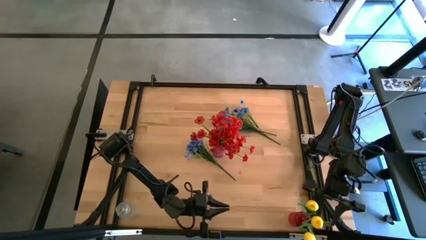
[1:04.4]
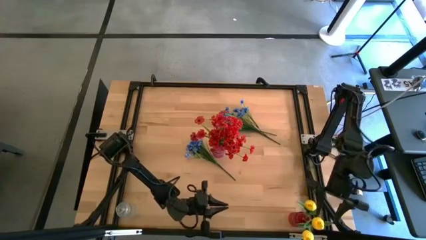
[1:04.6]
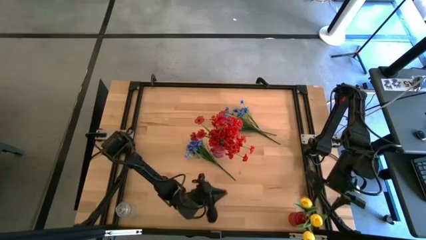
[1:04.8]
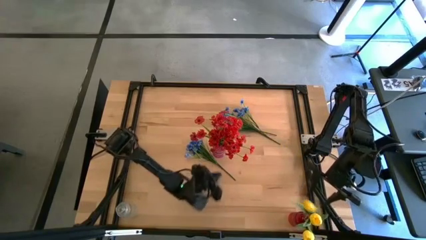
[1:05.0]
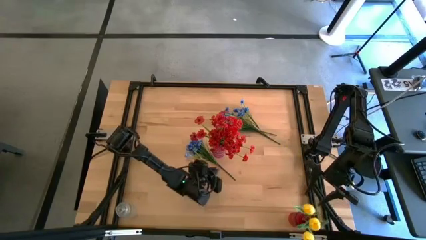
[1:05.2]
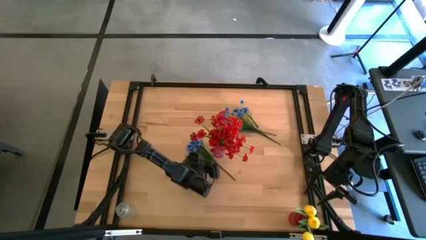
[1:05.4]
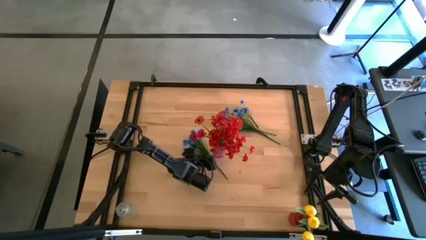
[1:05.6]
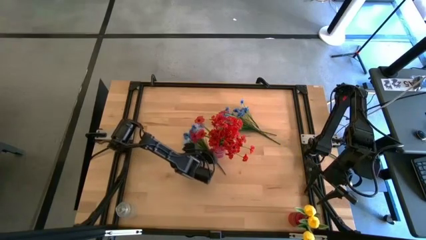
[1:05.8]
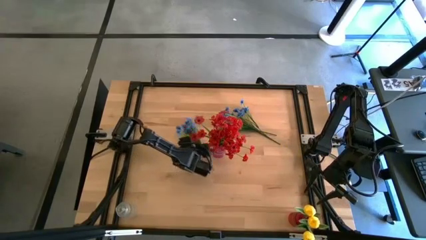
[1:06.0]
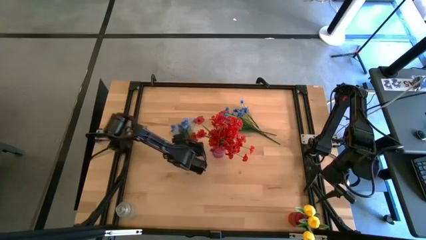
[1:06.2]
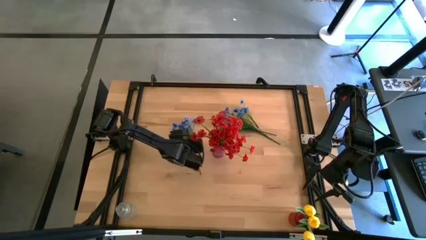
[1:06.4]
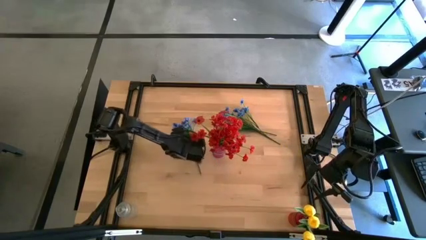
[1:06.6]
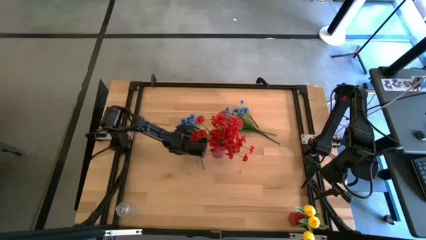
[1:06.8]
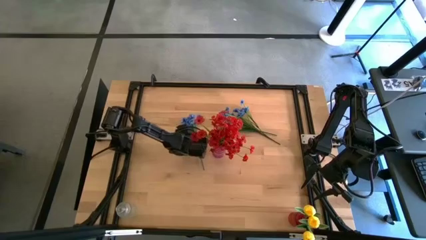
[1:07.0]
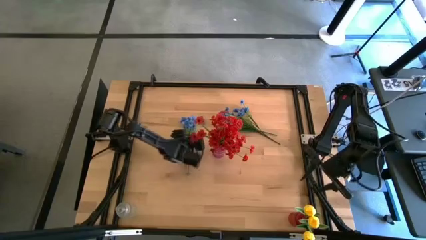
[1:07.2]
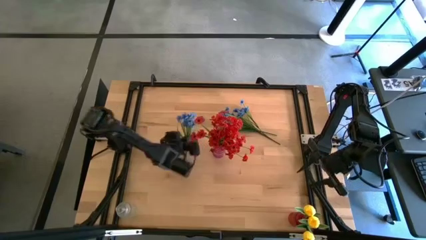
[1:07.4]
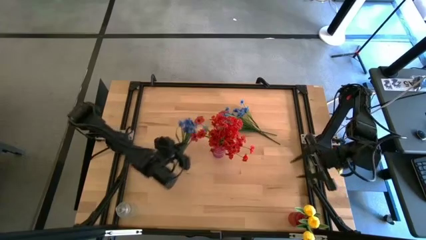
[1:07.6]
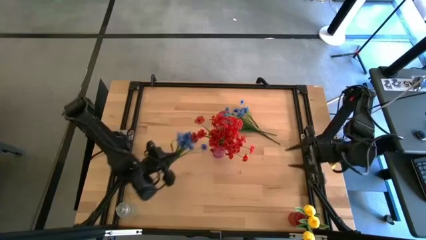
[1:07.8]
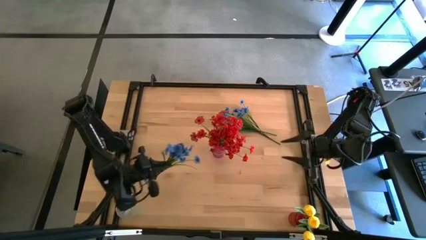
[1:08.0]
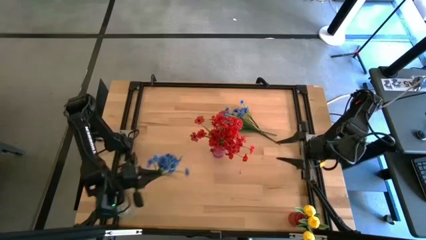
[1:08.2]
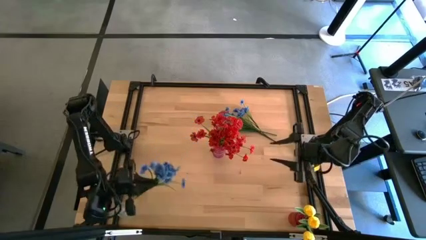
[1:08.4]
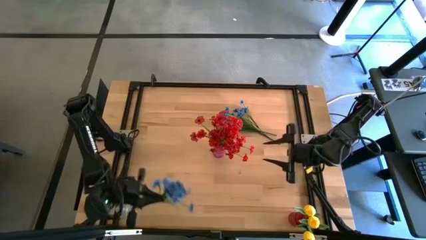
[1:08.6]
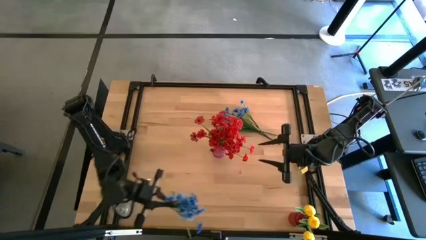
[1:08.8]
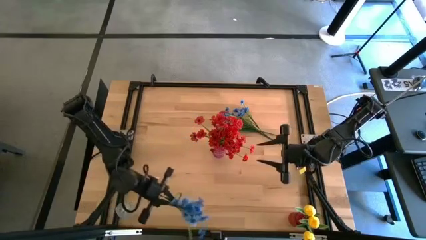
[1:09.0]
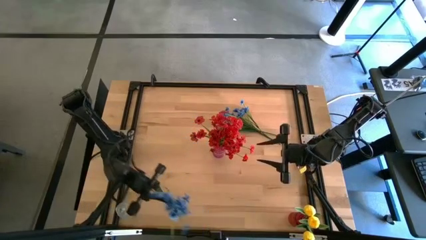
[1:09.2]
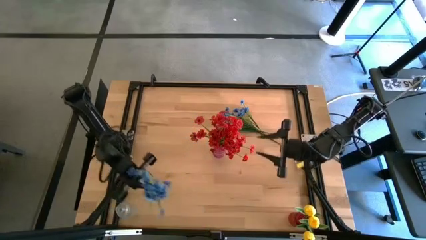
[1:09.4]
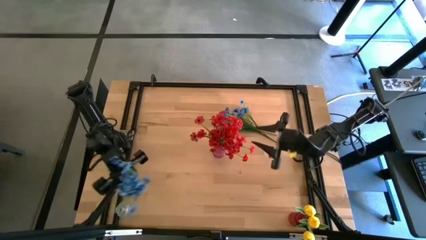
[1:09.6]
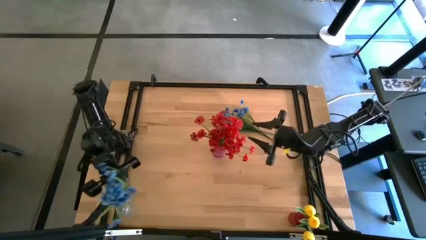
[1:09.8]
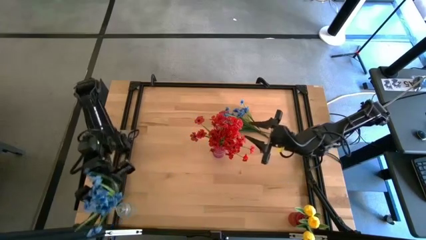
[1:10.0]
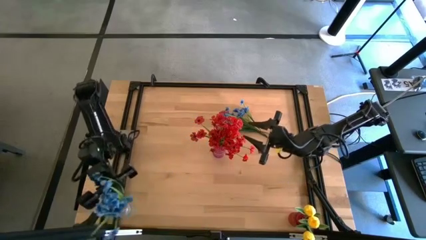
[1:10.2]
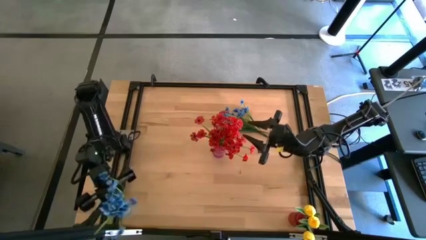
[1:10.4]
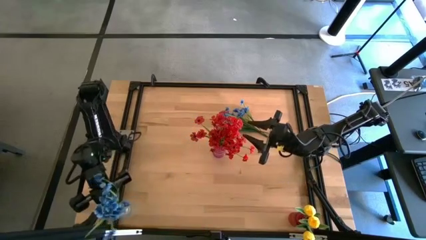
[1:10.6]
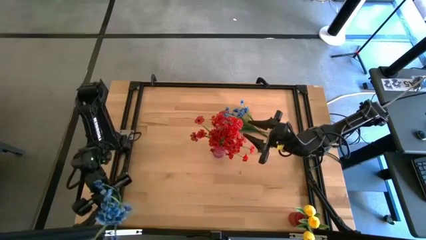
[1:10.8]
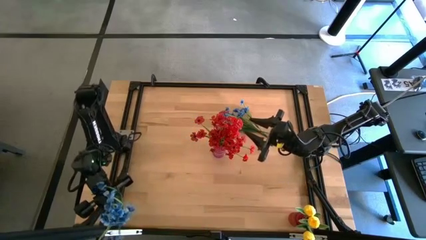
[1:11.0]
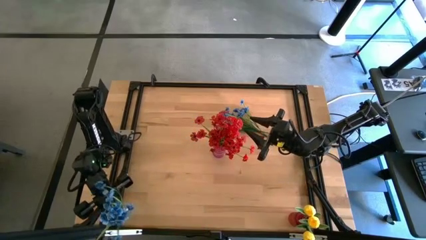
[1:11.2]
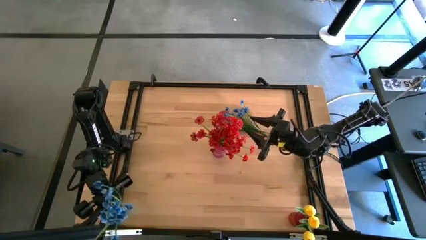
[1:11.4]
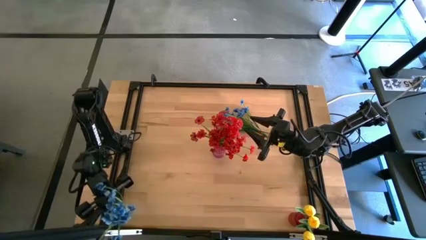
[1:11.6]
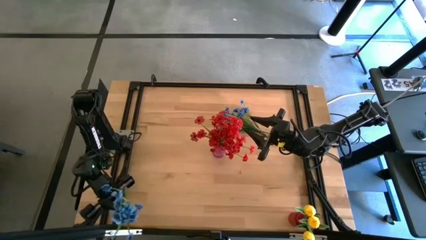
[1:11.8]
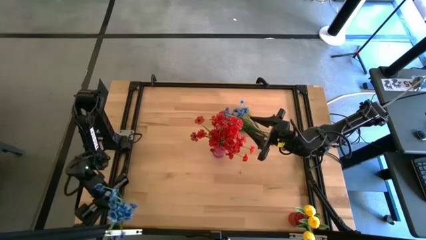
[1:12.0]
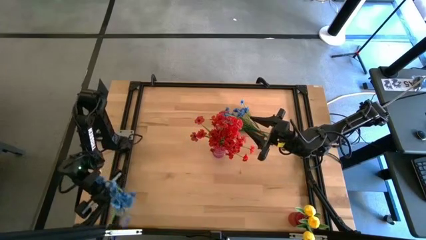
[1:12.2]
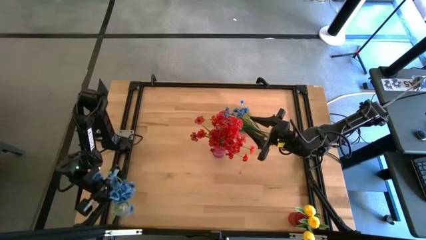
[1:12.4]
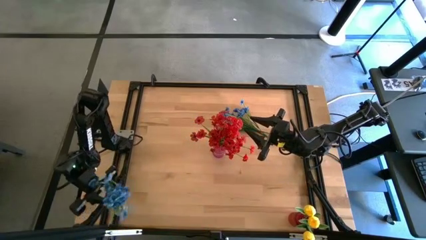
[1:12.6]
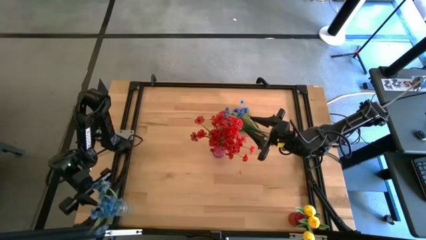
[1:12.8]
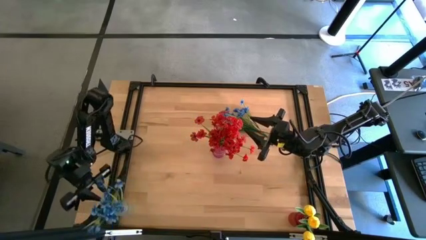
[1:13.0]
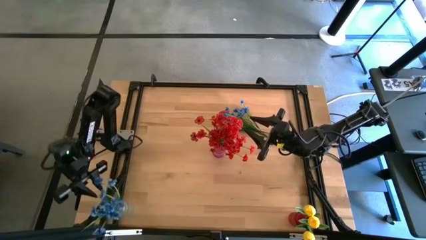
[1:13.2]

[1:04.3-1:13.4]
Task: Sort flowers into vase by color
Put the bottom blue flowers into the transparent vase

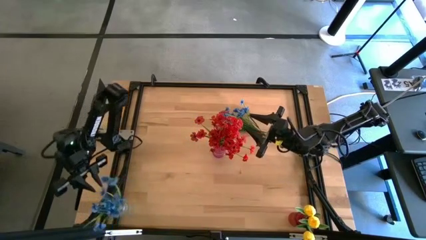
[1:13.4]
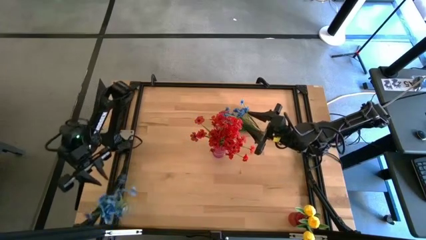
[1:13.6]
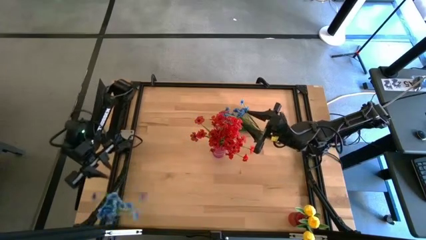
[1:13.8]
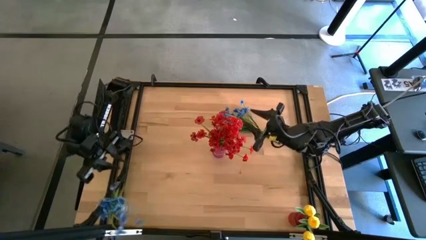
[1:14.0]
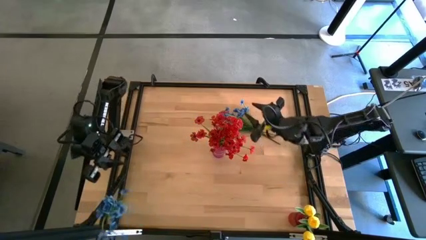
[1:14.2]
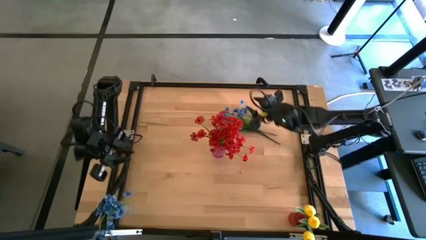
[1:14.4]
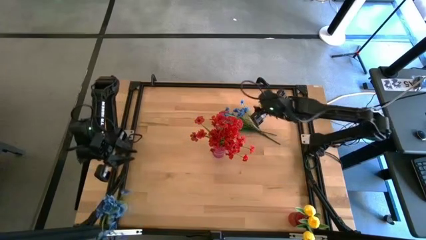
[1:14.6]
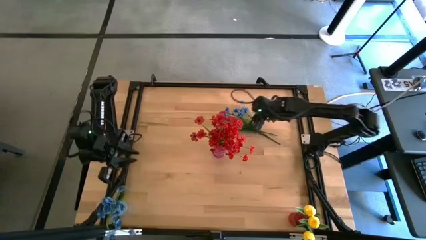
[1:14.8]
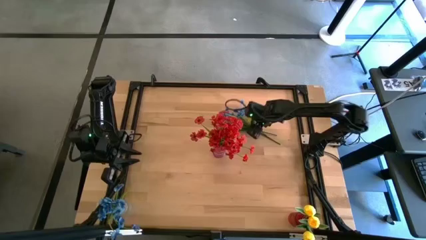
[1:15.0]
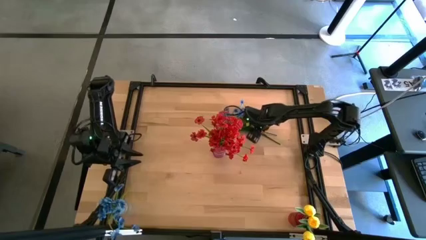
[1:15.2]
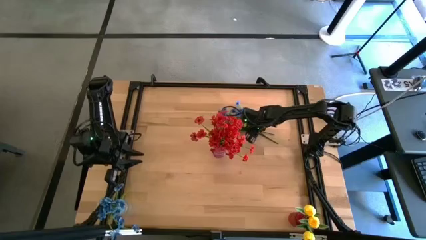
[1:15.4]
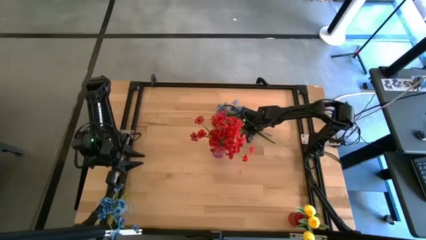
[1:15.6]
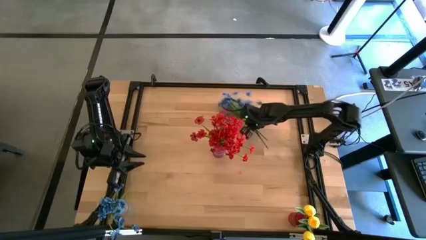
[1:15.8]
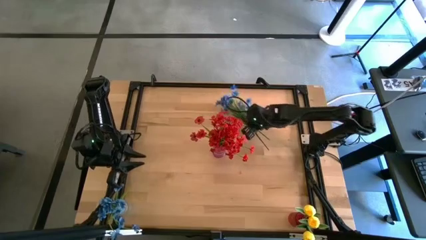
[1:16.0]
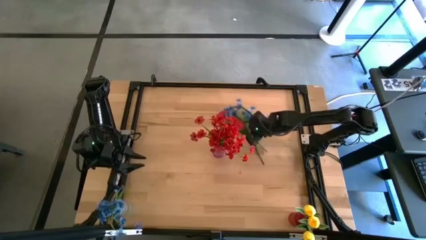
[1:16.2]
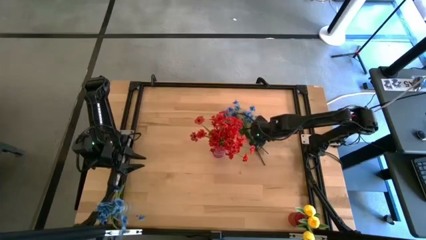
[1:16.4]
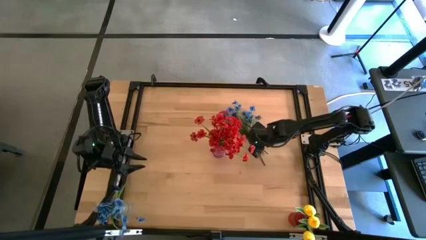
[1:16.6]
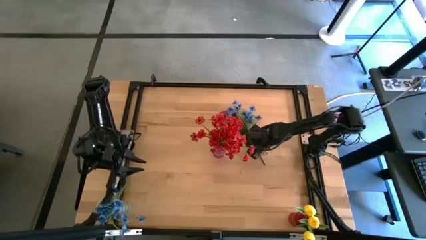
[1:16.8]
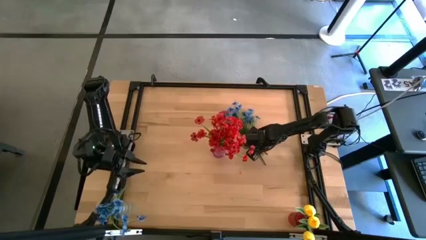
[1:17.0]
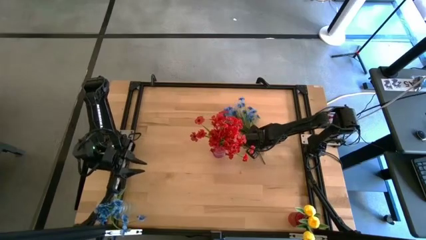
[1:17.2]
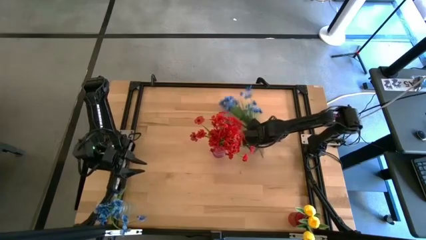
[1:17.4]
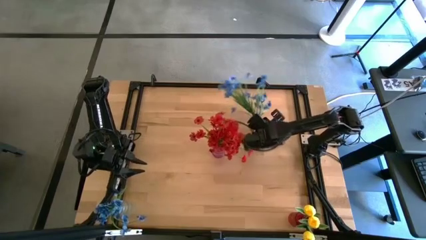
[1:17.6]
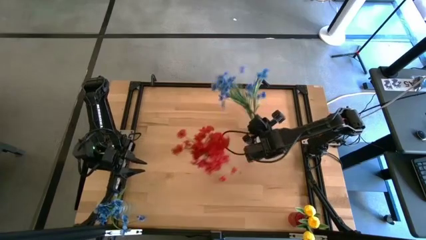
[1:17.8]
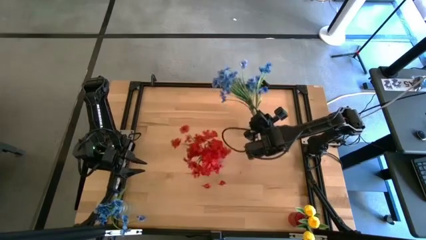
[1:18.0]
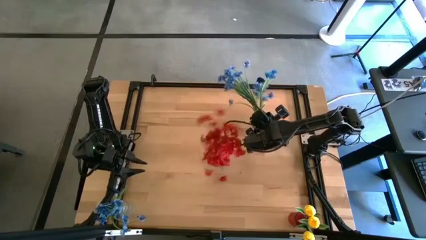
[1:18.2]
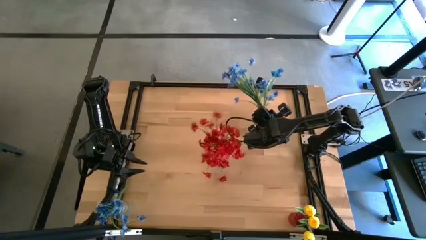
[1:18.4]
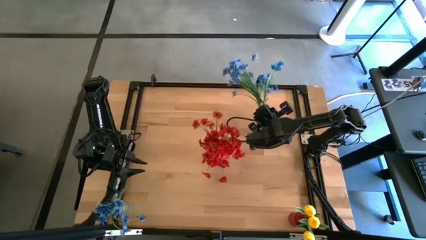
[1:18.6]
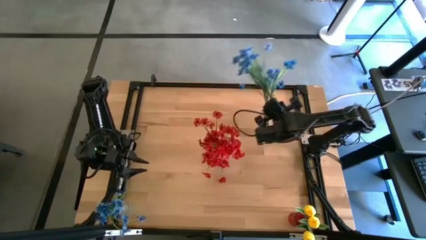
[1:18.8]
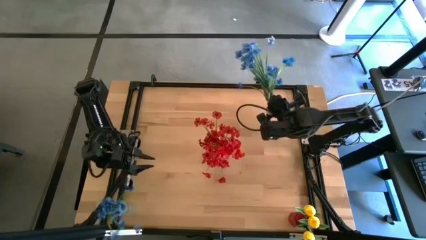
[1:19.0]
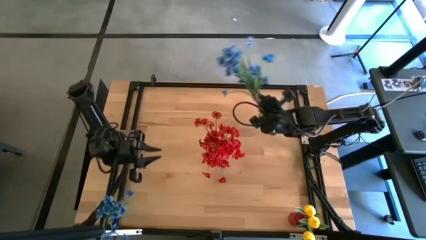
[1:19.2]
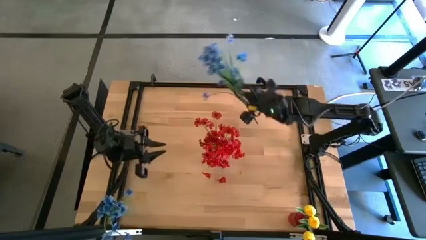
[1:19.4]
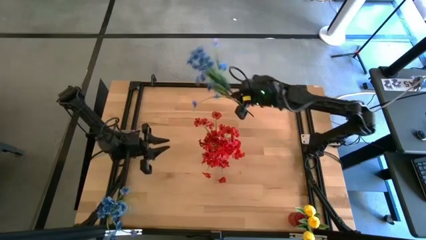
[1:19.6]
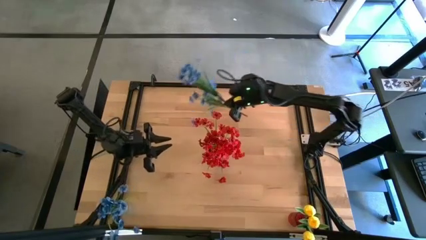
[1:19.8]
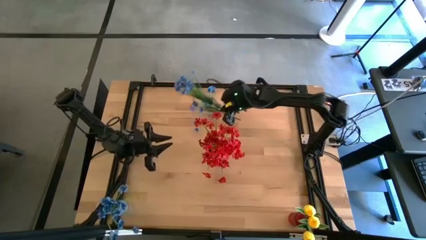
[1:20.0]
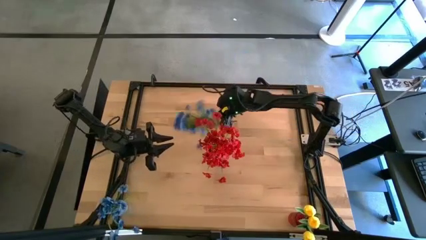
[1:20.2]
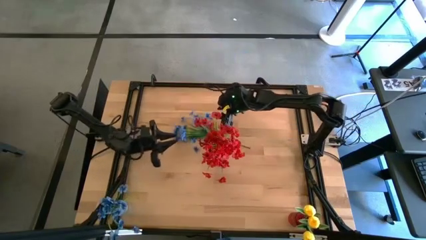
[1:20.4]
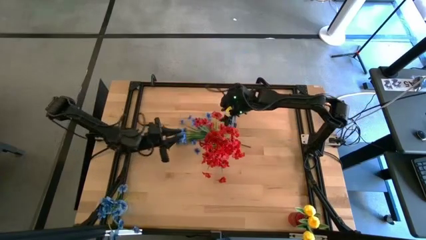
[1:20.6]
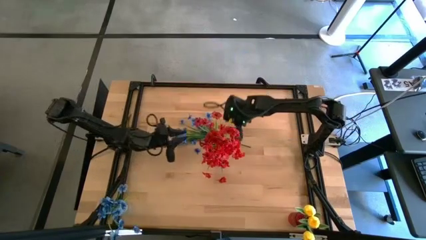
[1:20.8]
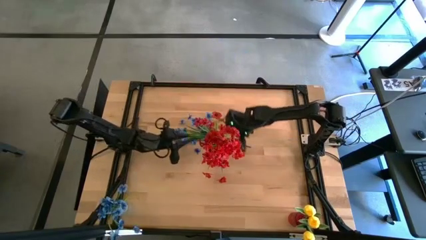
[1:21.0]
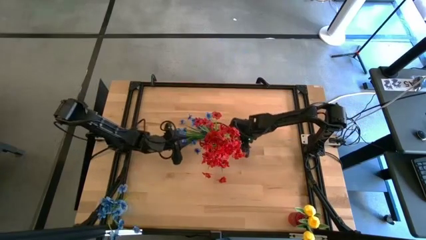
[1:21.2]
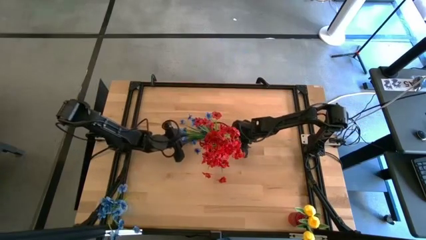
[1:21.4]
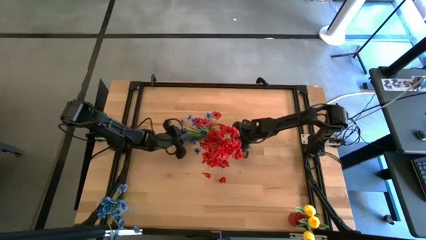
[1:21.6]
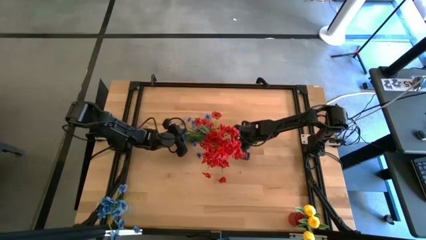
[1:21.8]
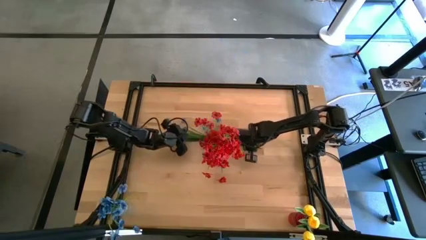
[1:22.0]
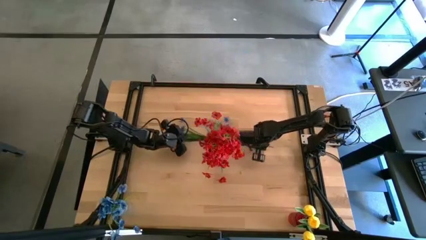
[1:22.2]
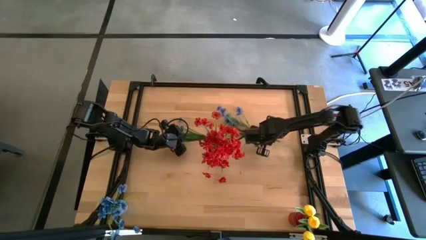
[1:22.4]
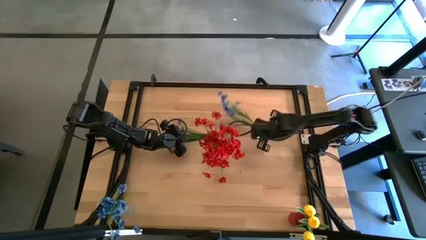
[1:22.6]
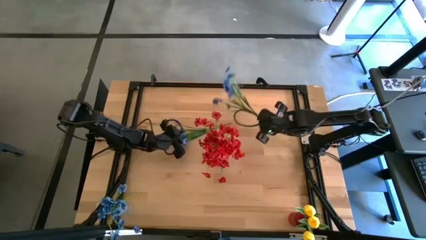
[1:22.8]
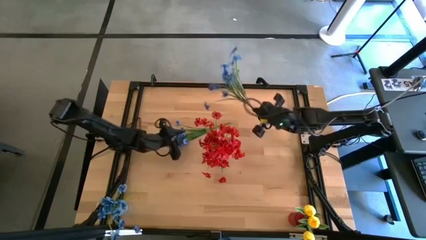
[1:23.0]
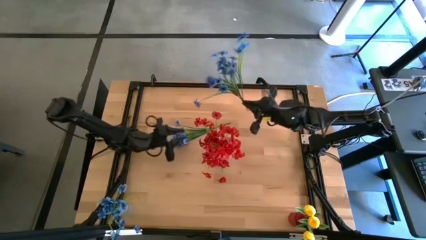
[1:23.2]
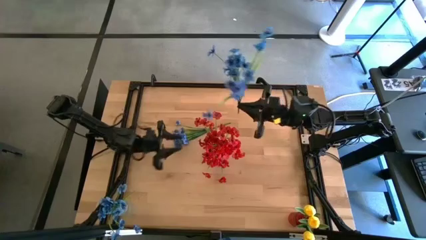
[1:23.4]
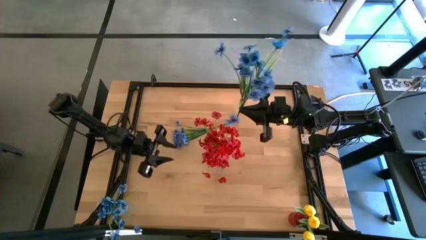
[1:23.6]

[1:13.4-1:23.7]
Put the bottom blue flowers into the transparent vase
